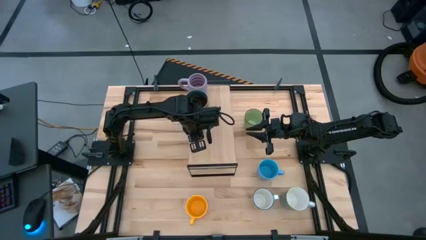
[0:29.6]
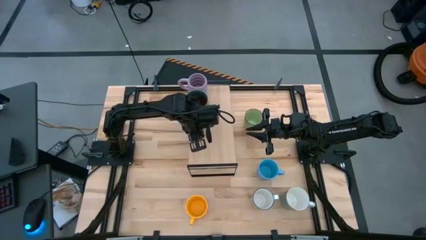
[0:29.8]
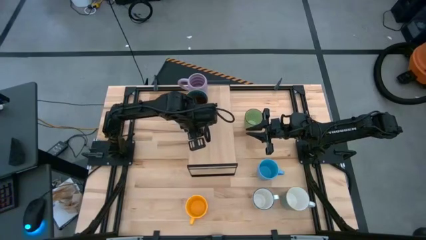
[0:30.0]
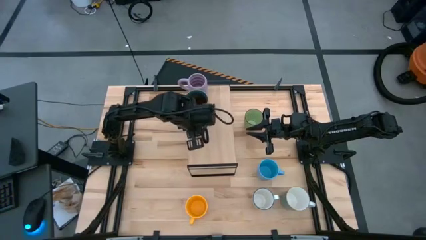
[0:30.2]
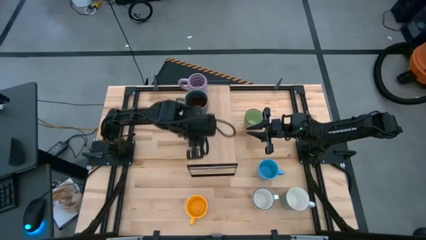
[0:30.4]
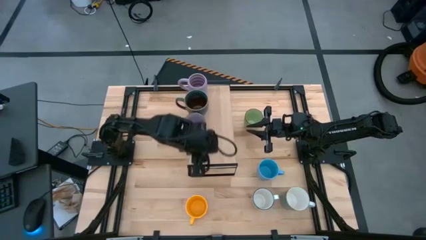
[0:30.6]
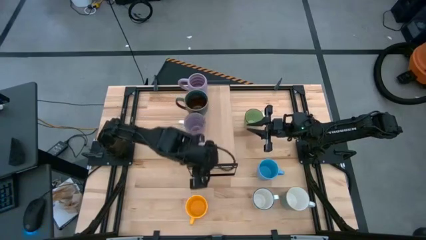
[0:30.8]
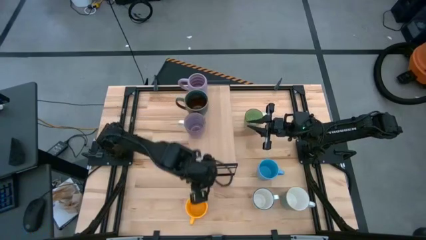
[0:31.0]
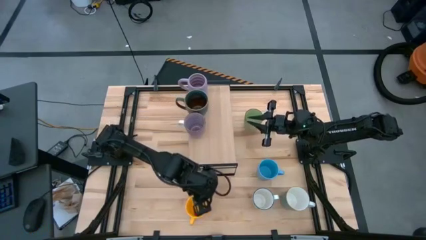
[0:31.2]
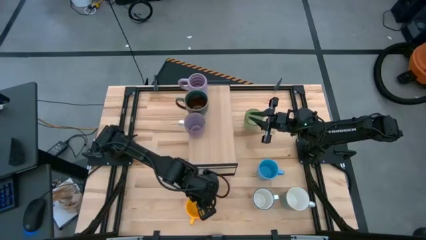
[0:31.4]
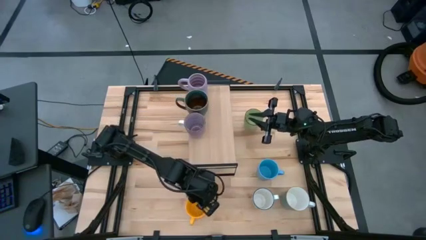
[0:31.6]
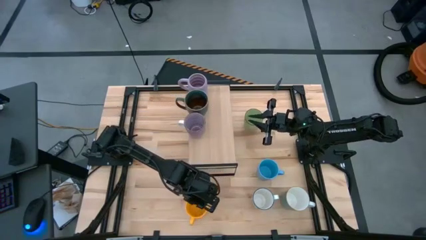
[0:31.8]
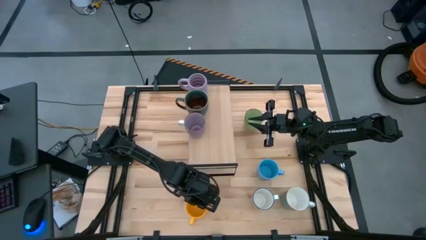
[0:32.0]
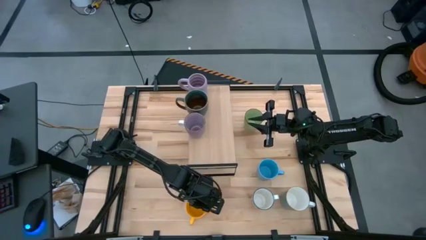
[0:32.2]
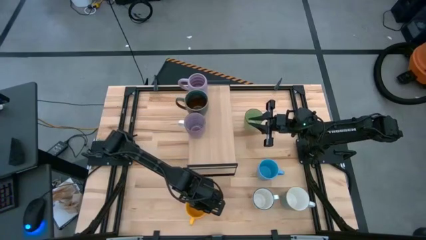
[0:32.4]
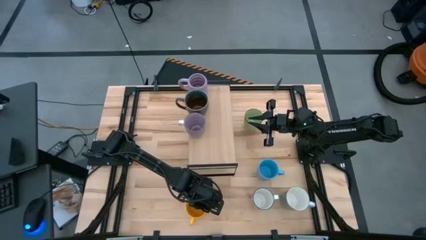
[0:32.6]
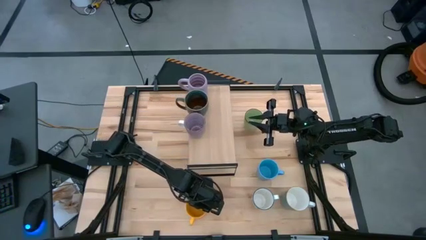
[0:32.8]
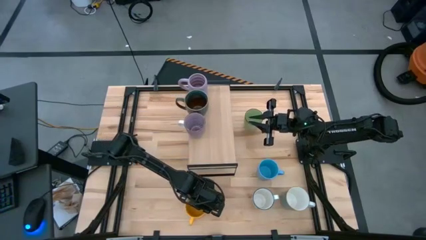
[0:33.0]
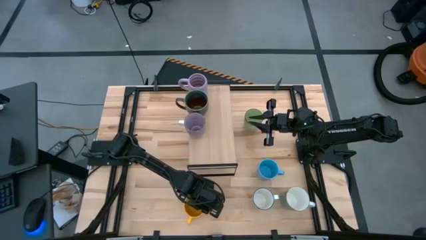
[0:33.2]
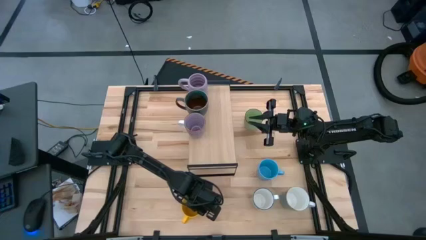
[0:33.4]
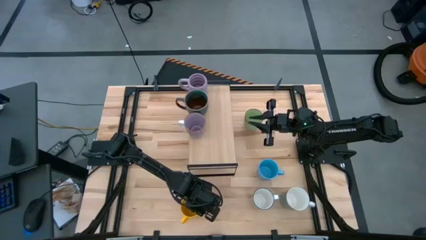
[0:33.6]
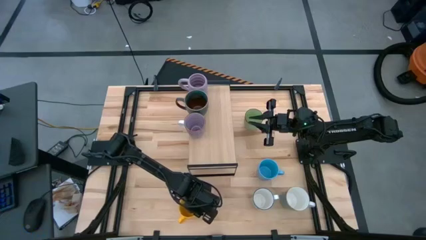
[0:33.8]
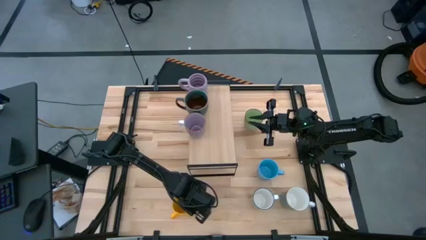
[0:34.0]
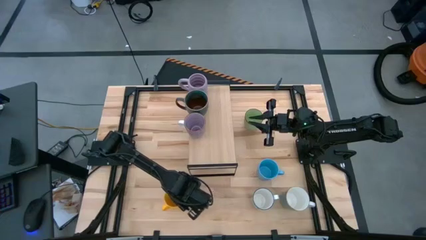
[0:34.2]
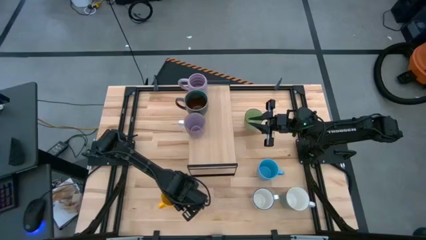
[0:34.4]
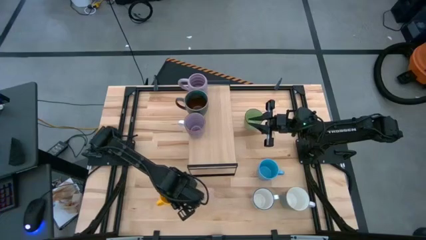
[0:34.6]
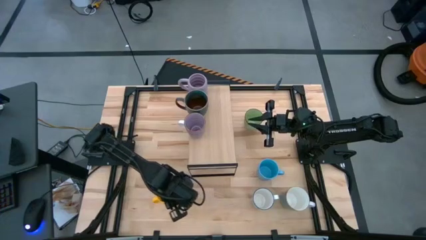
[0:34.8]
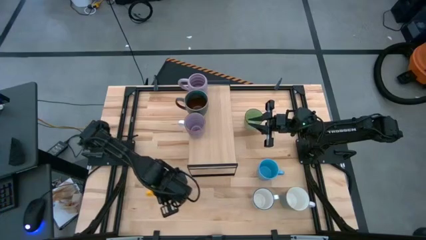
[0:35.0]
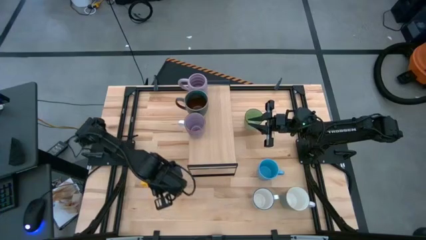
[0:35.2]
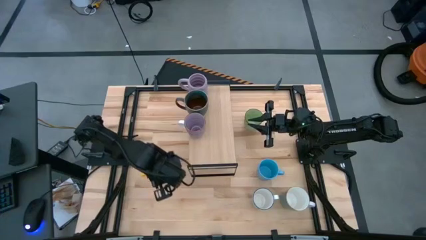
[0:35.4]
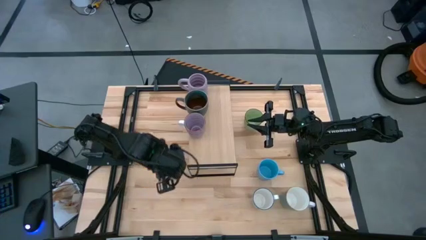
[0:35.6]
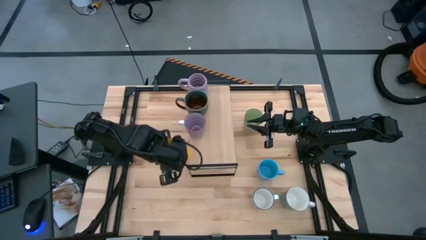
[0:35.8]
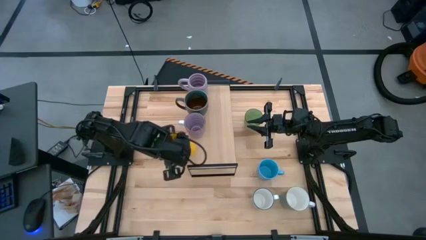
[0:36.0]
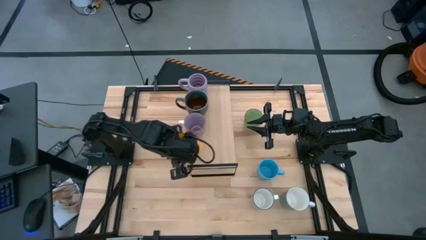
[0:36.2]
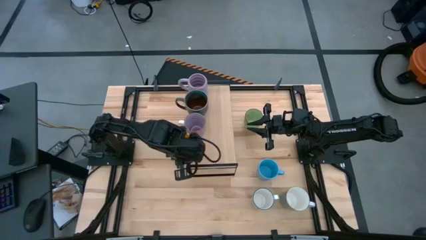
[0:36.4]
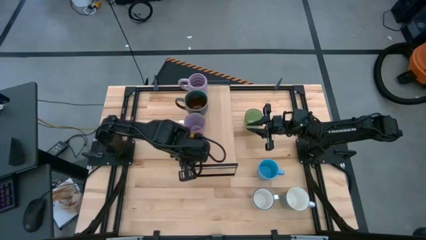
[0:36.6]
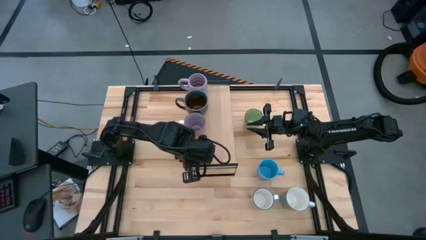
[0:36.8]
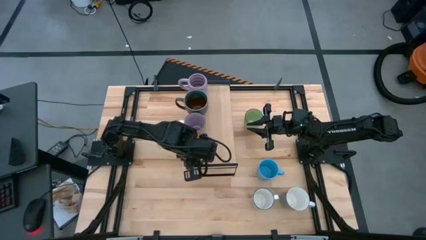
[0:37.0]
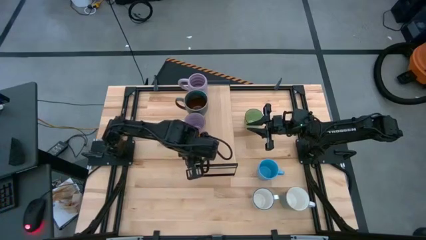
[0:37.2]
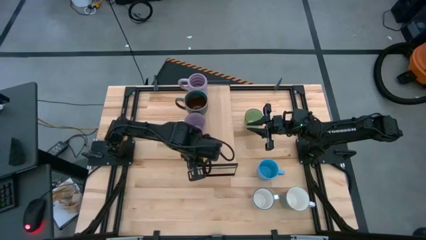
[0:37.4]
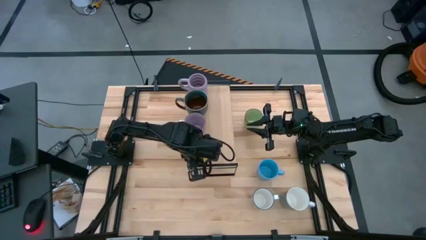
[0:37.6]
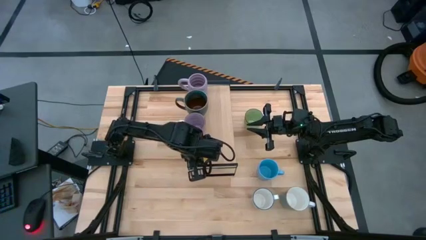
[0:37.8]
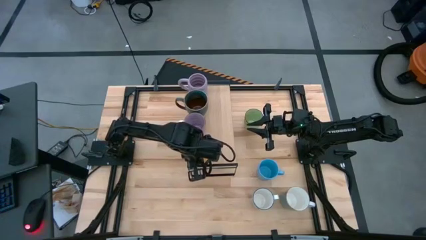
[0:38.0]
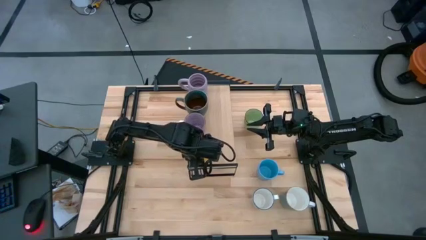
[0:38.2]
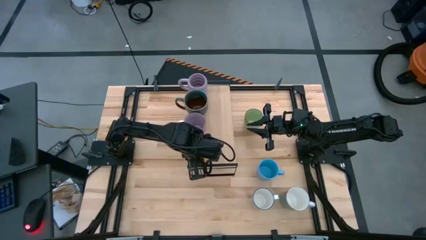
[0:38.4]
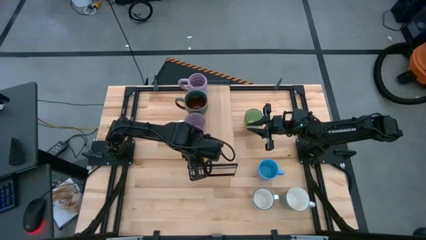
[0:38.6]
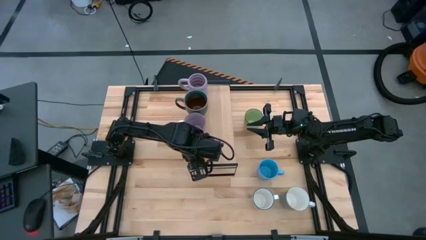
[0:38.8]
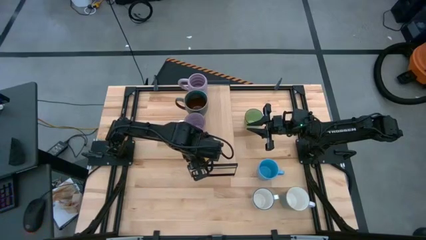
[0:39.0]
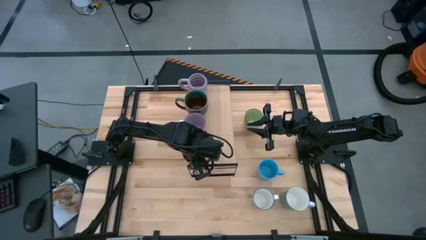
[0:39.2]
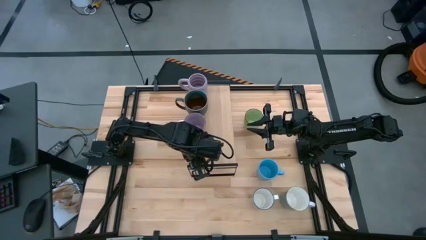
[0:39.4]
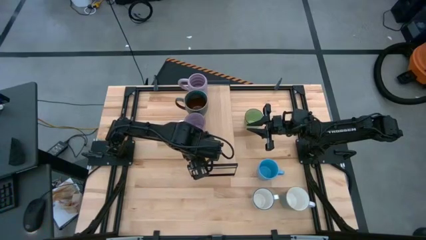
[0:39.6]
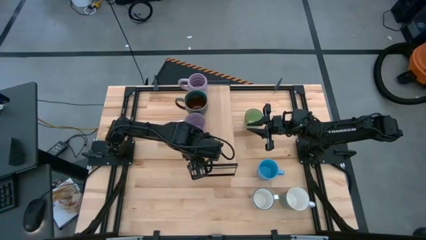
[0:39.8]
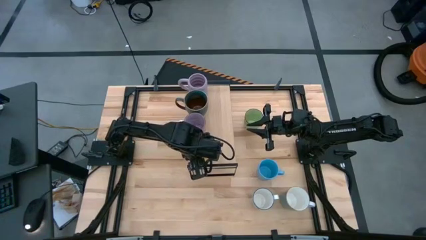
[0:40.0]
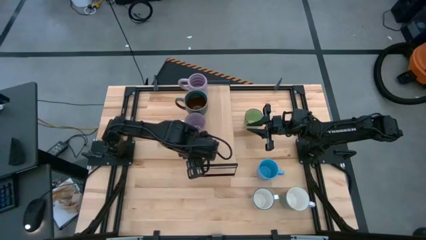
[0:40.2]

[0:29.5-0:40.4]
Task: Place coffee mugs
Put the yellow mug on the shelf

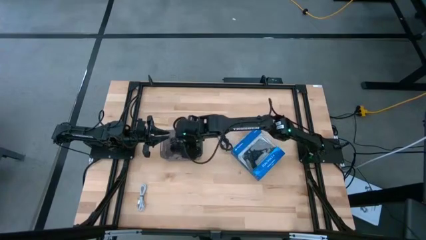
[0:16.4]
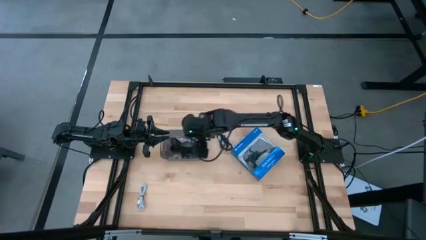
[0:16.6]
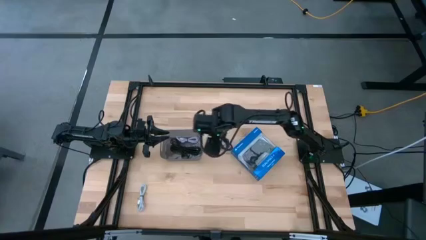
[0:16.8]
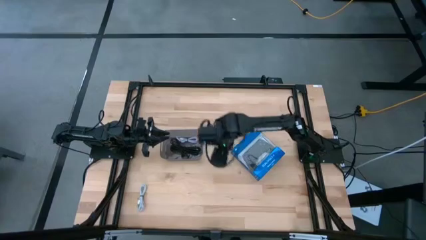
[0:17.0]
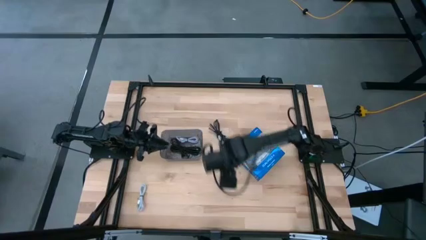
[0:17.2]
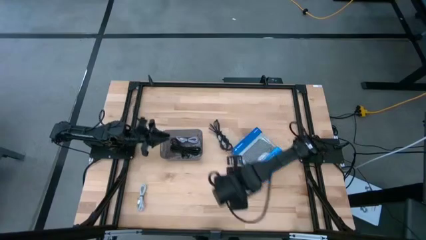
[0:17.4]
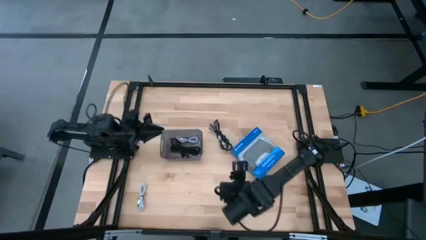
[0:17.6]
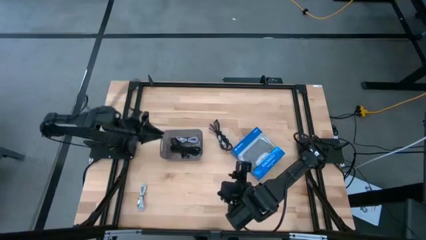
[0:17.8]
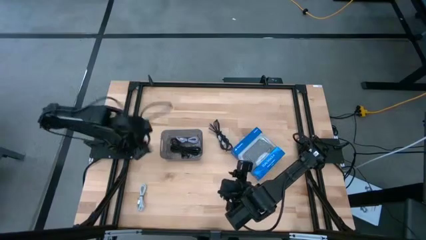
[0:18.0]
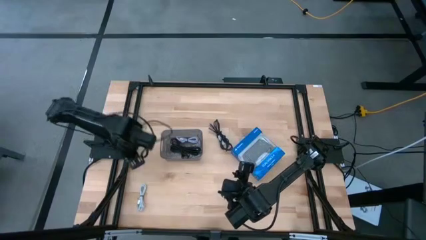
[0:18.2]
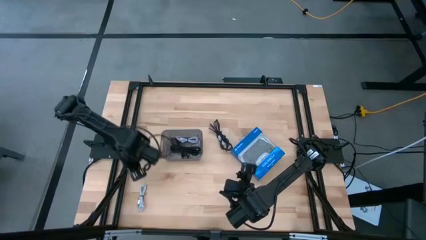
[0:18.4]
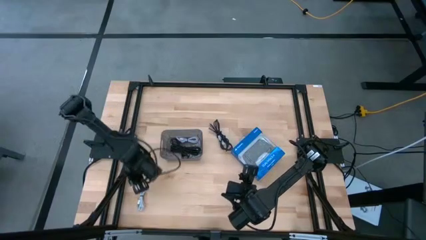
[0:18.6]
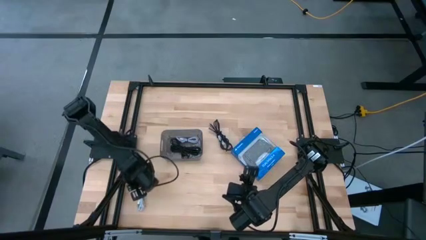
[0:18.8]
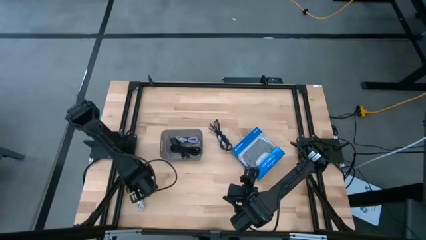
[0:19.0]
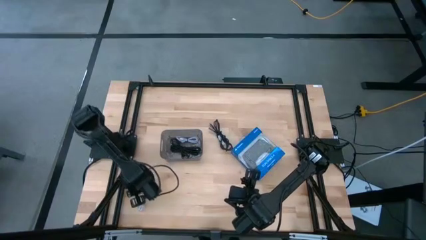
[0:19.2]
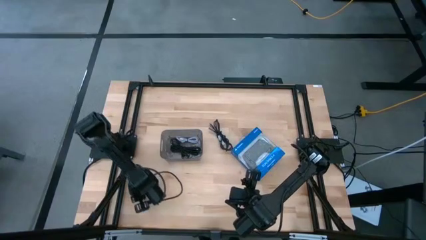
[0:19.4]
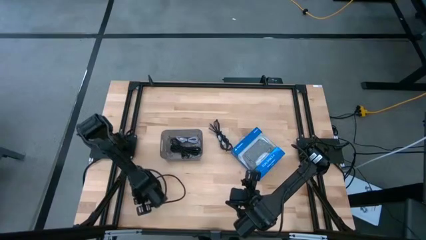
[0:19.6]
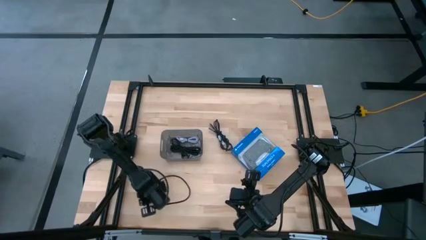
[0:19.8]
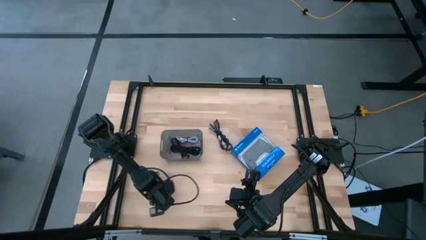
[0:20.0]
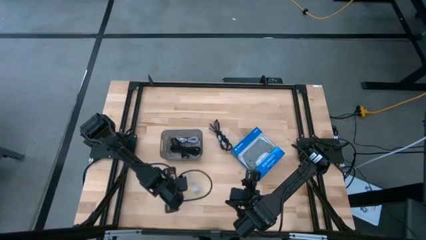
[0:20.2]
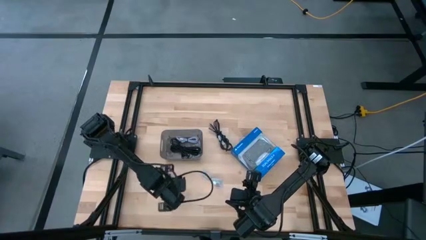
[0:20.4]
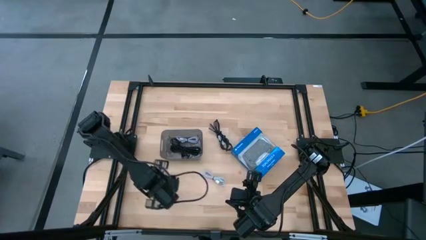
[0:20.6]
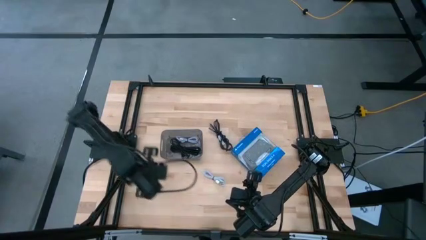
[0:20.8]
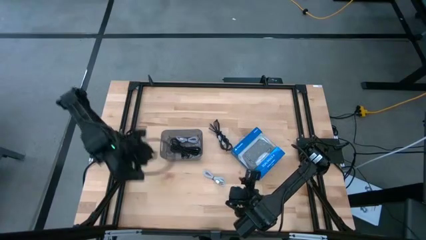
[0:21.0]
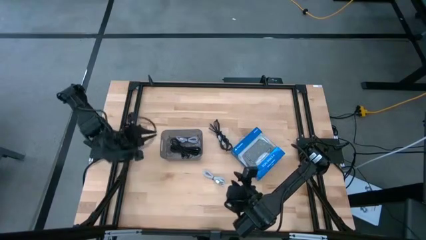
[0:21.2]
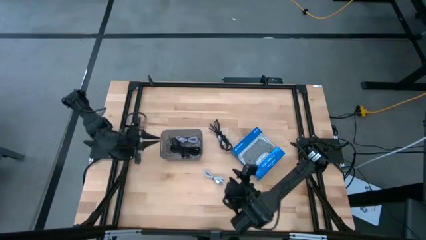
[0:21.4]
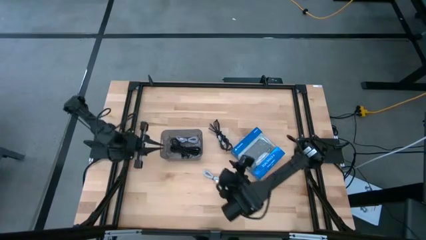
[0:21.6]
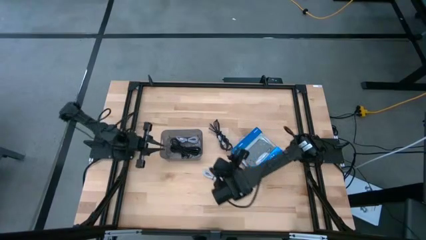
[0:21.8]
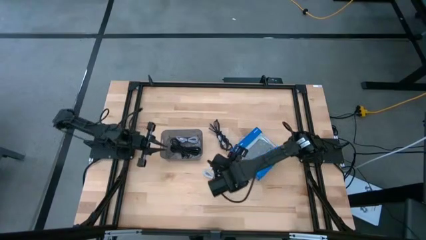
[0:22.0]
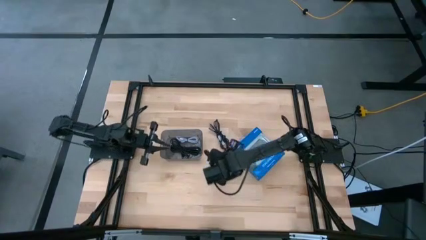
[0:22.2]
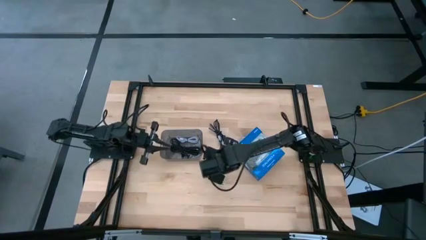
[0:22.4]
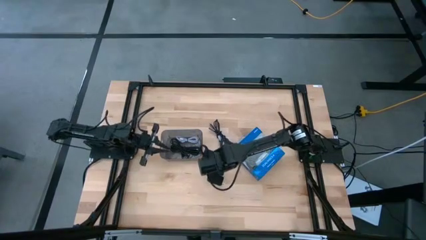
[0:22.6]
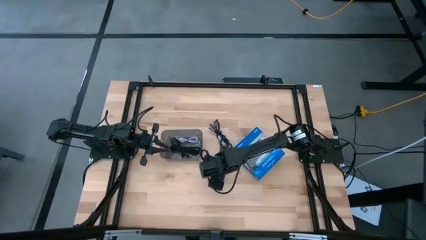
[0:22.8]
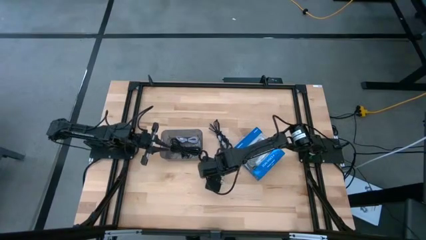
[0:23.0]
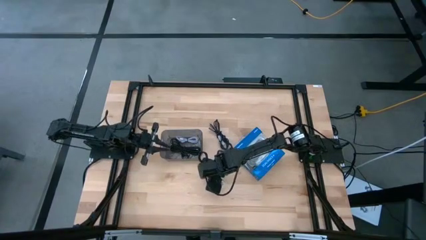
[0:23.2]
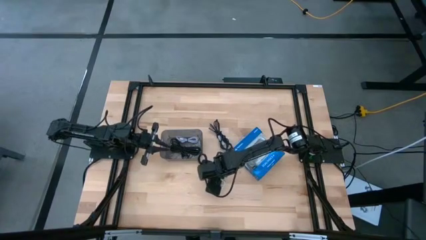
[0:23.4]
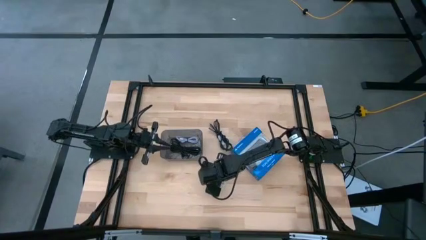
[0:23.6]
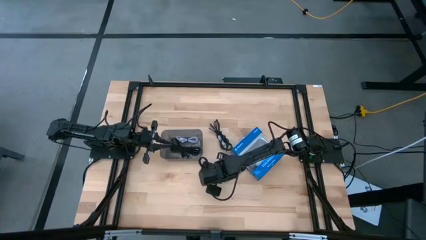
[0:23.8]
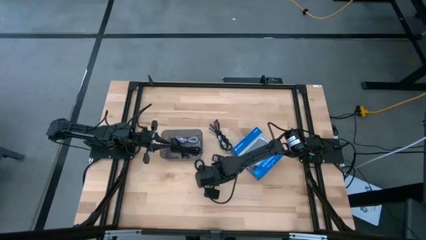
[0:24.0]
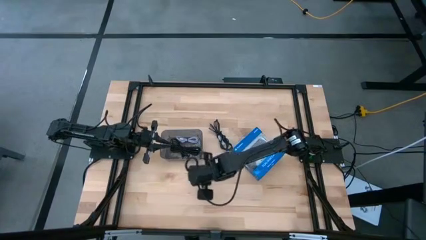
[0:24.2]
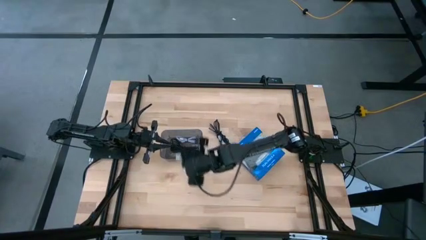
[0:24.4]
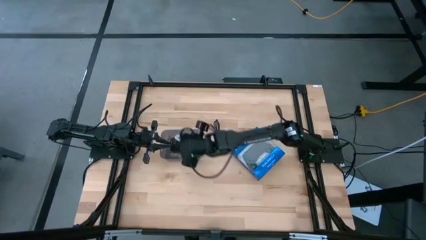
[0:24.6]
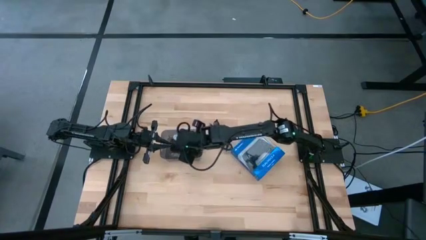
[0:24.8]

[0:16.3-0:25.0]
Task: Pick and place USB-C Cables
Put the white charger cable into the black bin
